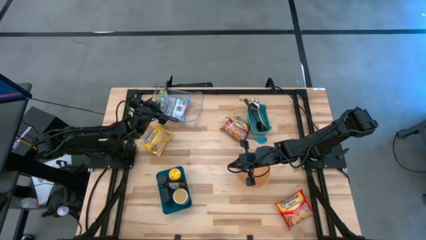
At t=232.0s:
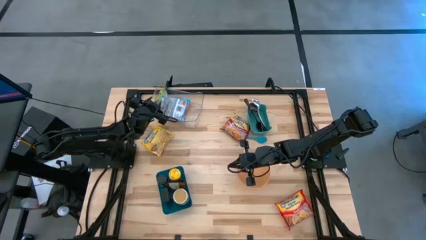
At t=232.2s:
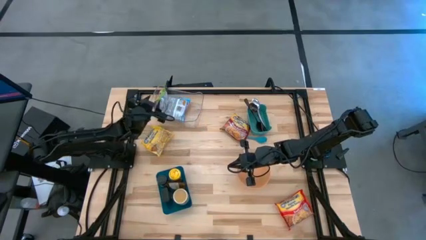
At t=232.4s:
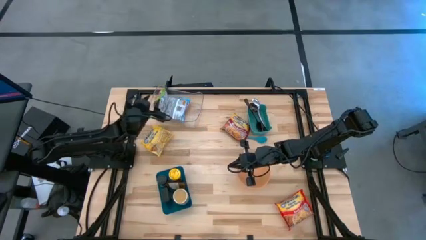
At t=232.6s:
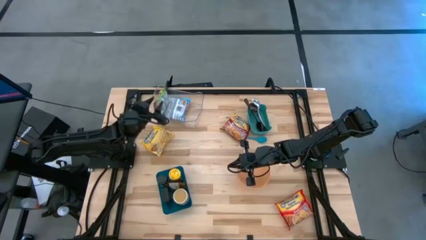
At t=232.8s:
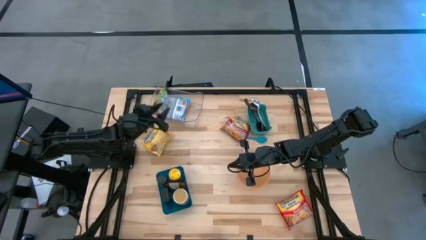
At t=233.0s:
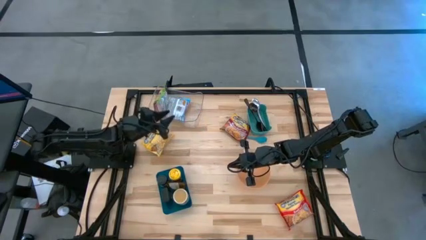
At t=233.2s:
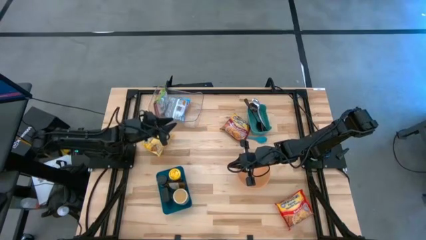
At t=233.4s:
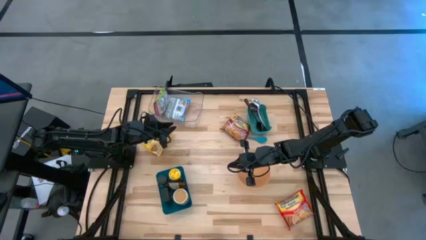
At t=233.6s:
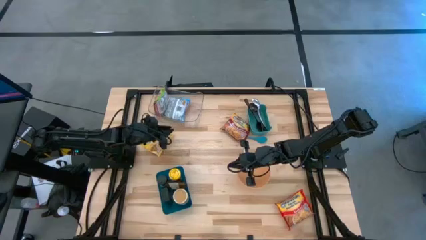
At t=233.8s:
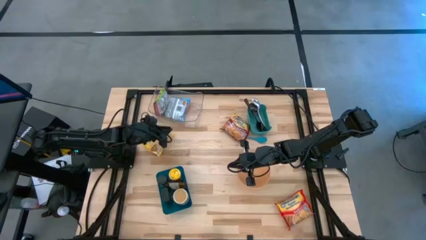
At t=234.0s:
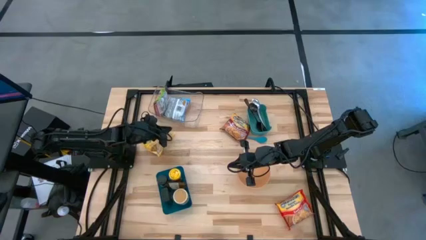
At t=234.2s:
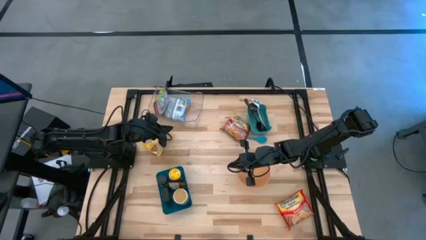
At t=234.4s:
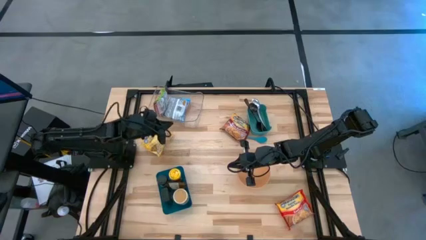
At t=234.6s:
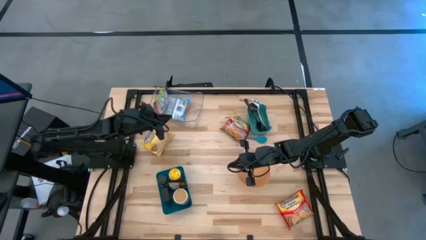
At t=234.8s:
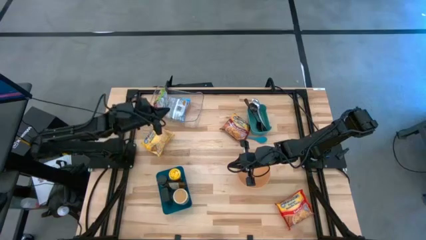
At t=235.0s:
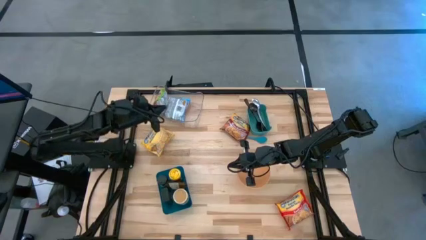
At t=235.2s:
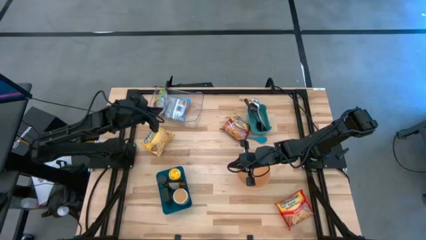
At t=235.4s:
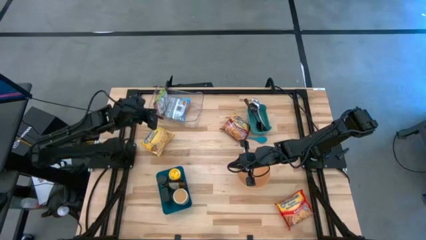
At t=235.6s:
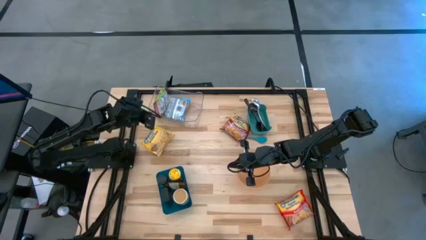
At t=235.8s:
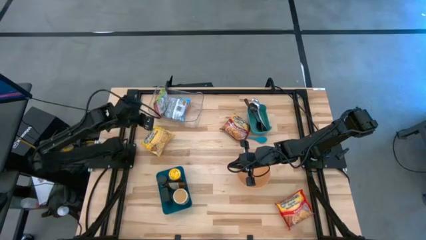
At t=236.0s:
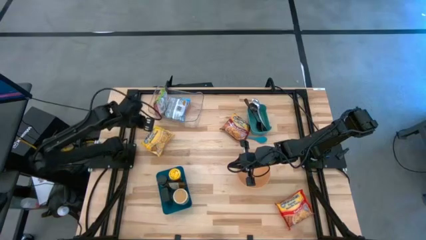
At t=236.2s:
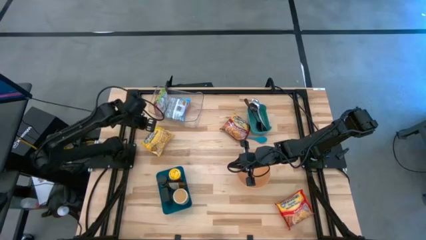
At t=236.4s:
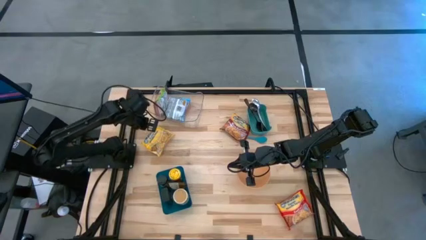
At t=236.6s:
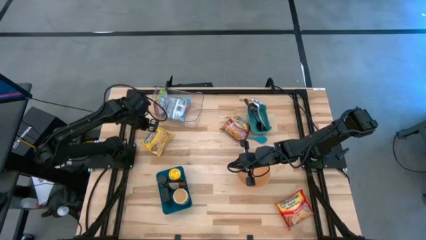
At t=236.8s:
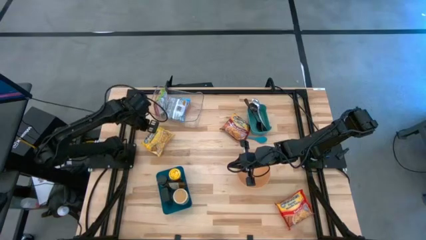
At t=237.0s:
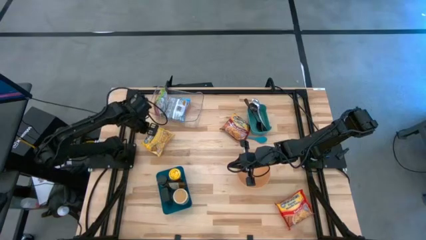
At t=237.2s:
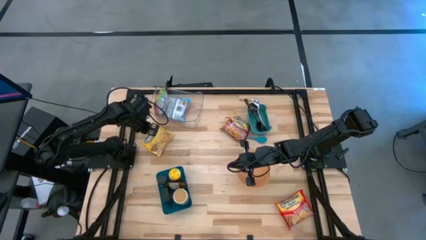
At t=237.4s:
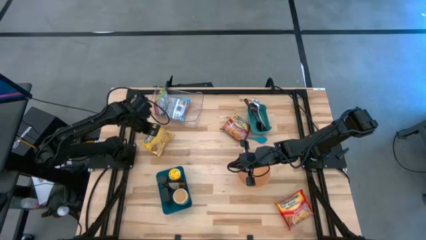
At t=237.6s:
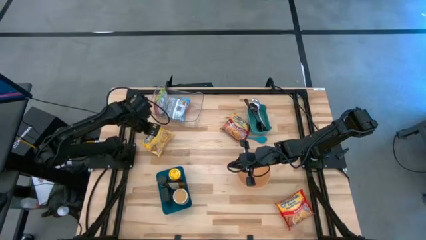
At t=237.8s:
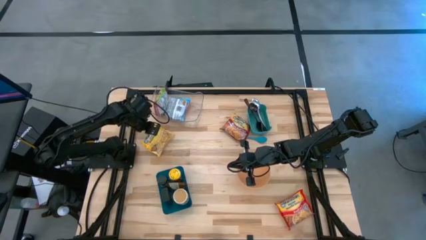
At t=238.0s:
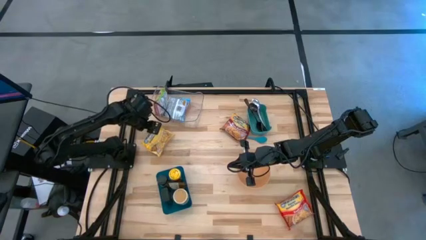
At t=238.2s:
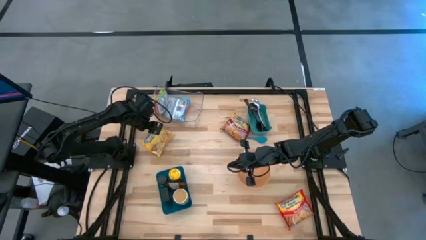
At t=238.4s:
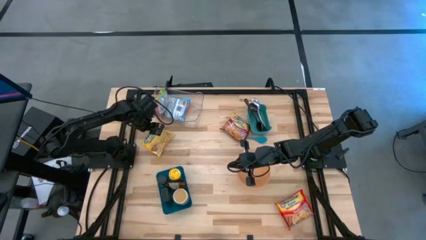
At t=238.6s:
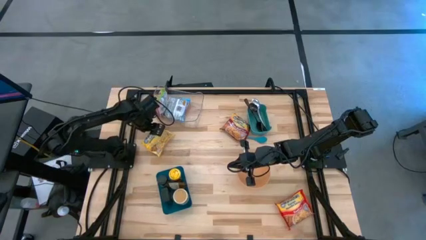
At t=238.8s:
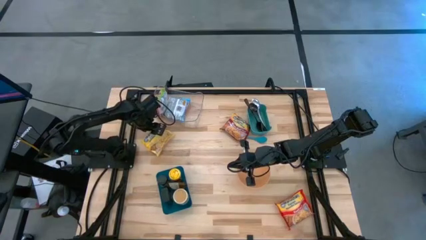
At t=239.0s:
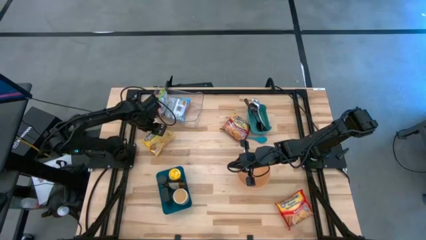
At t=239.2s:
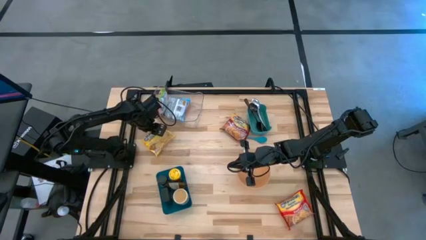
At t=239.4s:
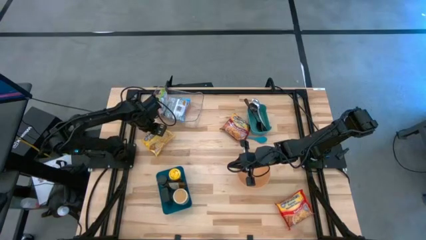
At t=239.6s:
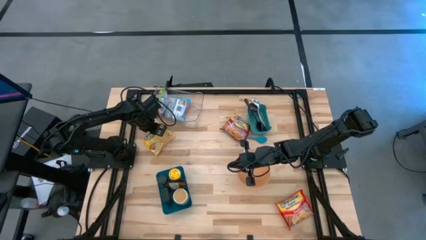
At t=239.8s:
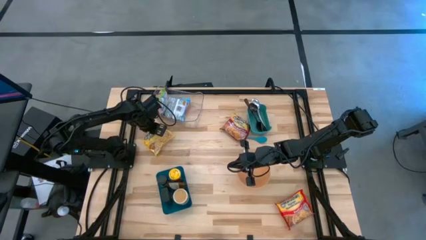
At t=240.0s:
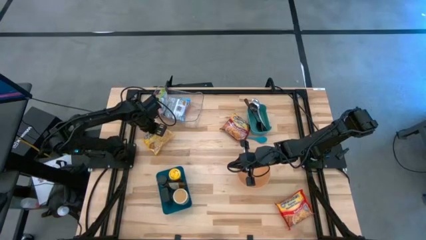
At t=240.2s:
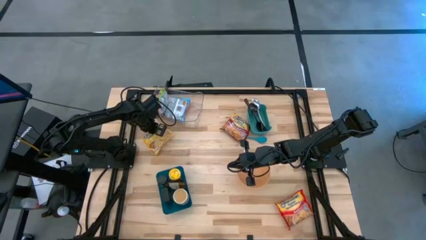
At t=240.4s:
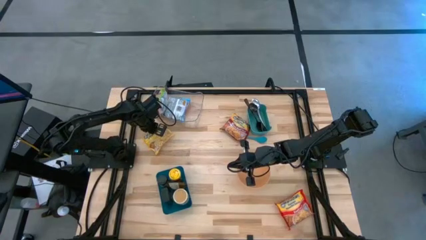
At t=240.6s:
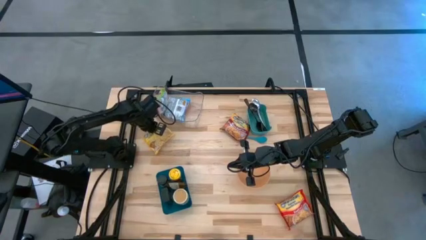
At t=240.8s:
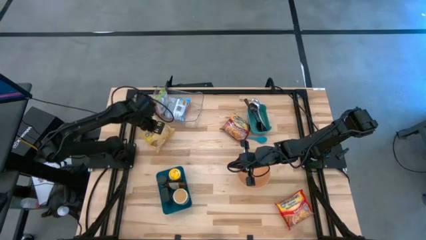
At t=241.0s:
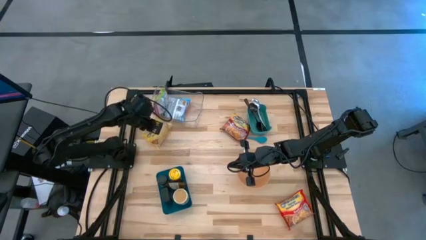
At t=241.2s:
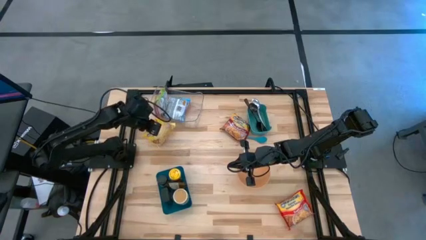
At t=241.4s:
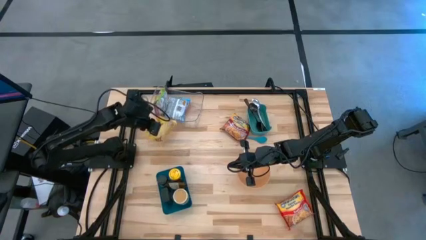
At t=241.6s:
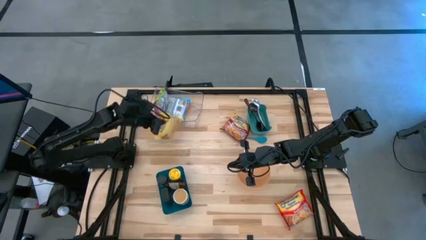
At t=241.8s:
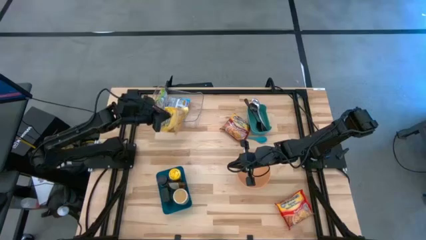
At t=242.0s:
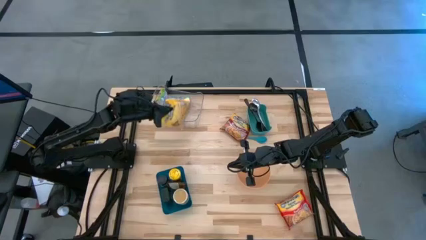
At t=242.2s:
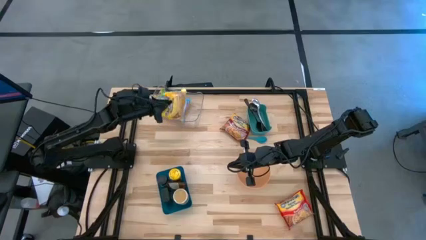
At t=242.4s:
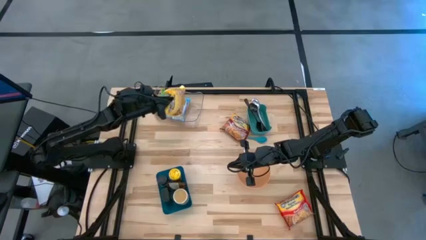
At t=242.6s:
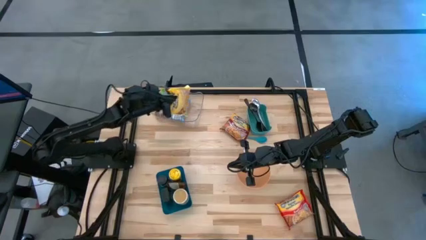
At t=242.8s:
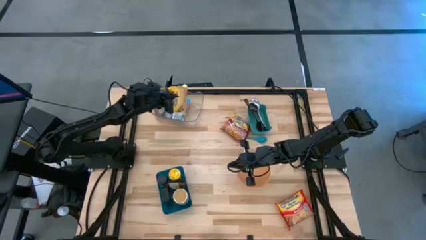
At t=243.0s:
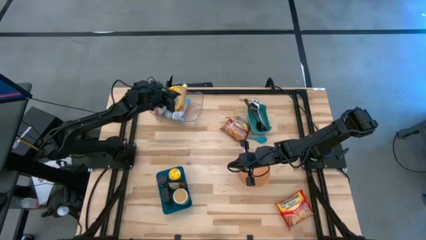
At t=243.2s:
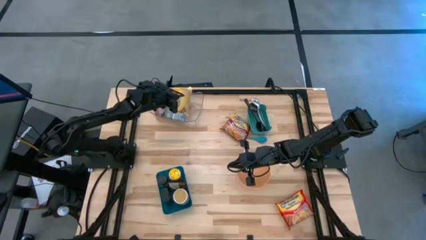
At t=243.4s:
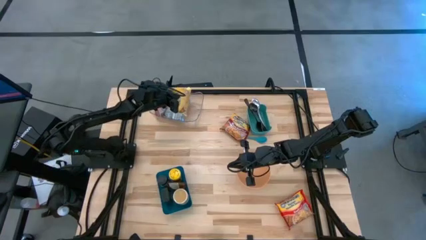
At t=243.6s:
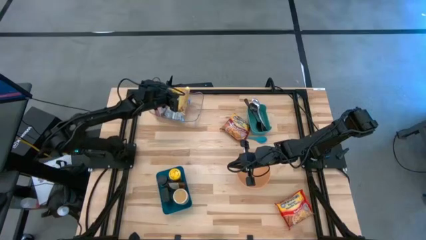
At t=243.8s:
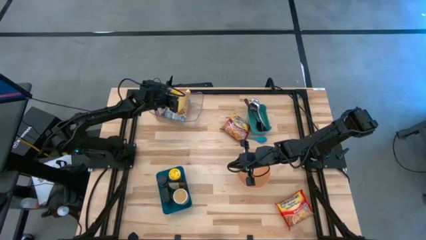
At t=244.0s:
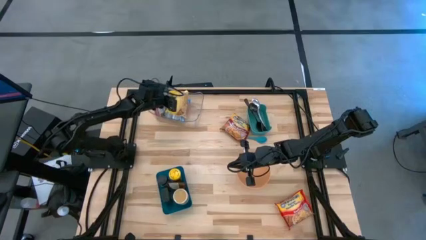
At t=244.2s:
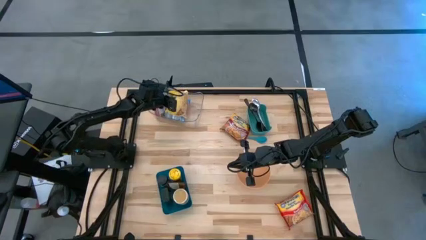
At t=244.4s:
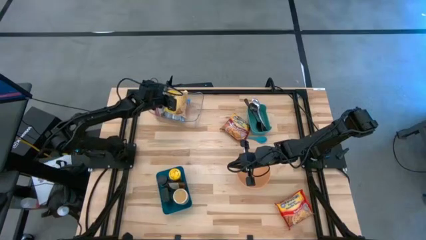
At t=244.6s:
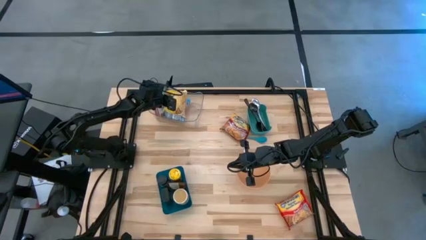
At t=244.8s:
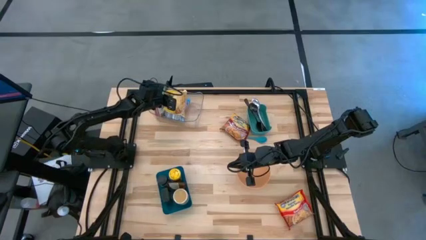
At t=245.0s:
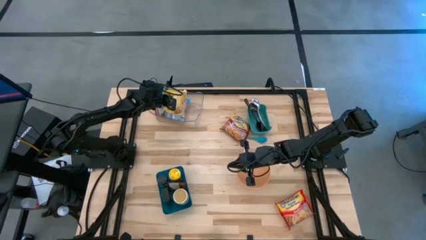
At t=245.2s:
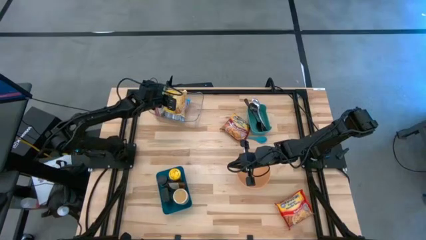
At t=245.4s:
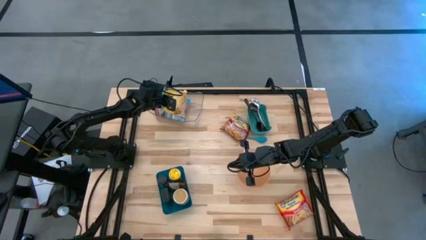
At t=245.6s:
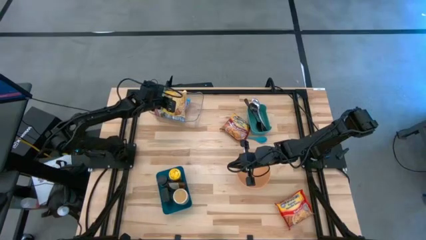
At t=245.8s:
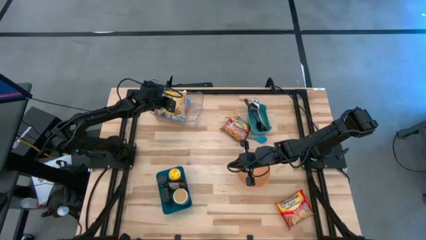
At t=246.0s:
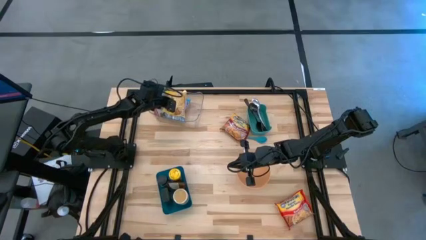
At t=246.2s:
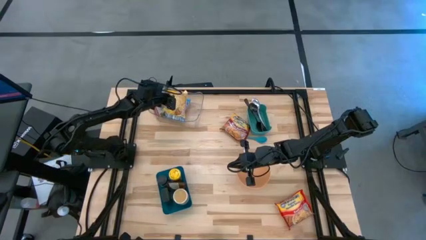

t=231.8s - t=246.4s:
Task: Pick & Place Food Item
Put the yellow noodle pack into the transparent bin

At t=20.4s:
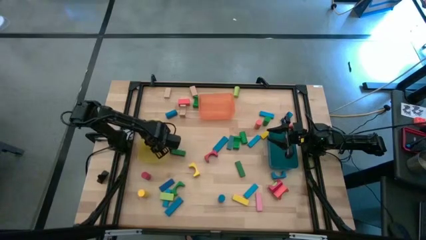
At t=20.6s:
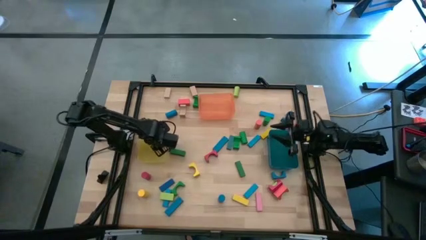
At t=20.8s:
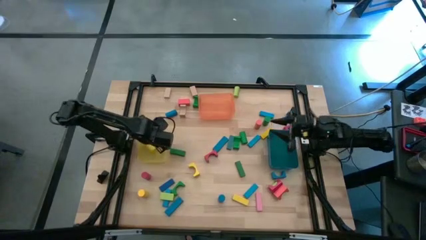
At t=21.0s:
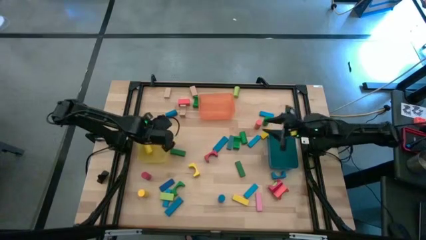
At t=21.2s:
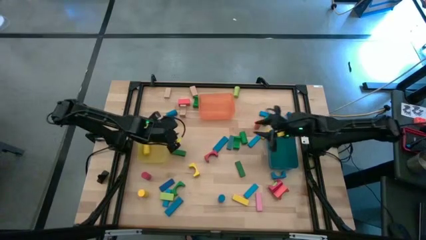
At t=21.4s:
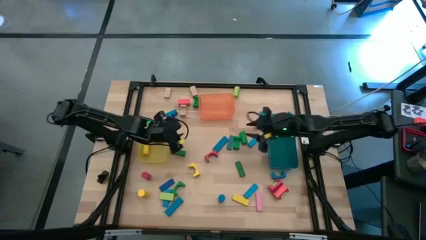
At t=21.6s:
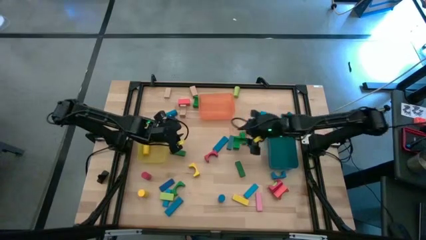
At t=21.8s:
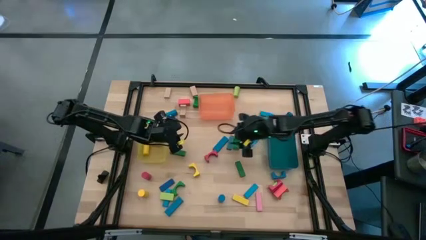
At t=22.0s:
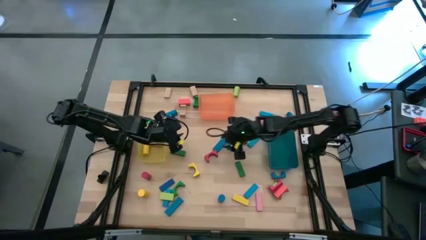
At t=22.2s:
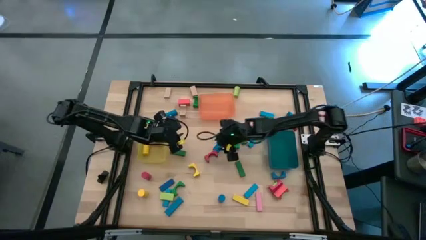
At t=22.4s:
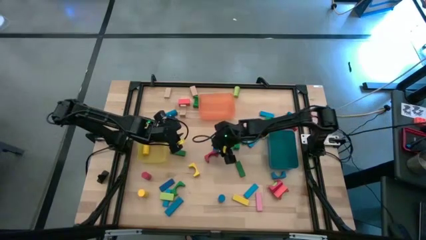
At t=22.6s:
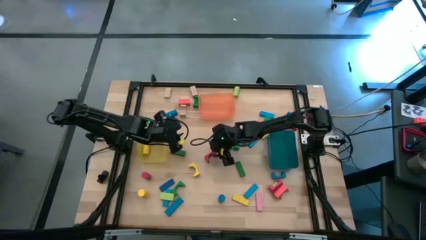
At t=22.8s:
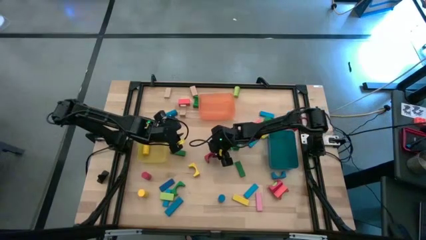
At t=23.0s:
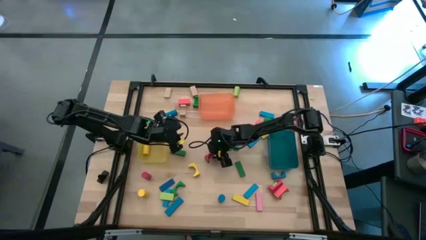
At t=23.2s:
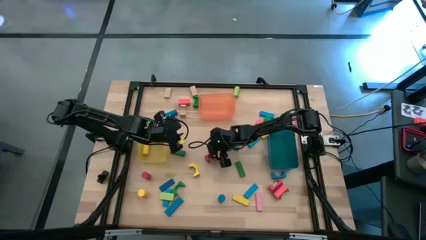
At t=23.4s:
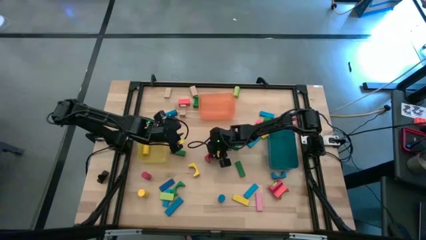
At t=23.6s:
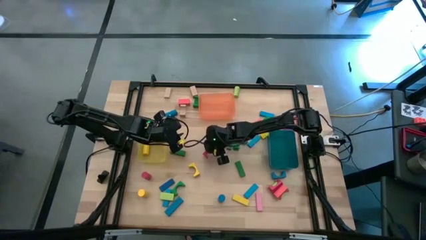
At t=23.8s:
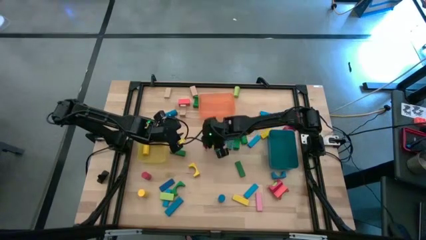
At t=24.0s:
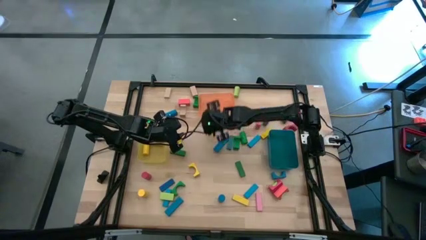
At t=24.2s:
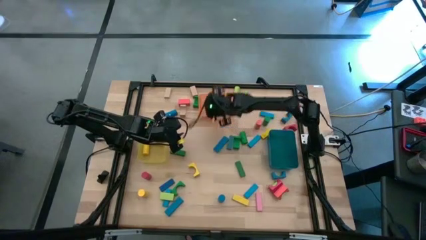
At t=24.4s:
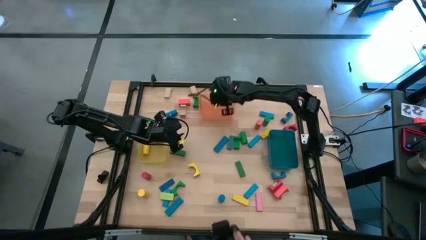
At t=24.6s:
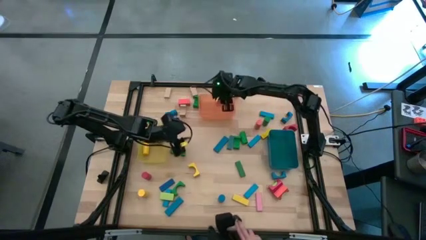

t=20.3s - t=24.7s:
Task: Sort blocks by size
Put the red arch block into the orange bin
